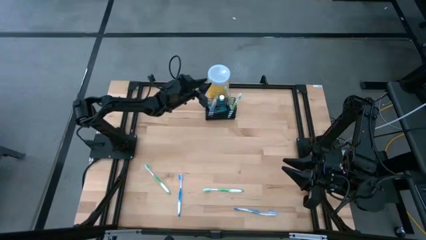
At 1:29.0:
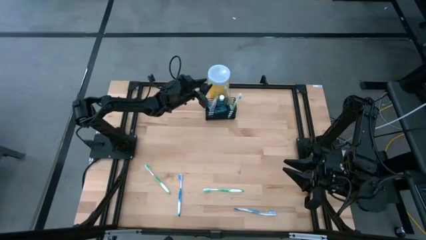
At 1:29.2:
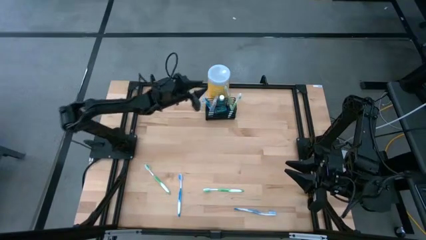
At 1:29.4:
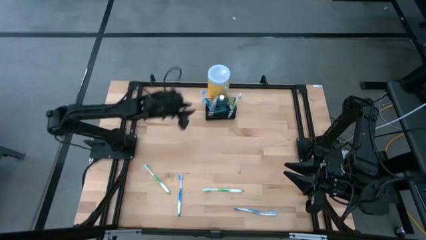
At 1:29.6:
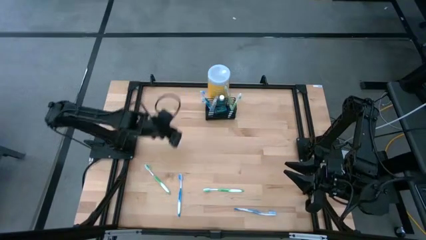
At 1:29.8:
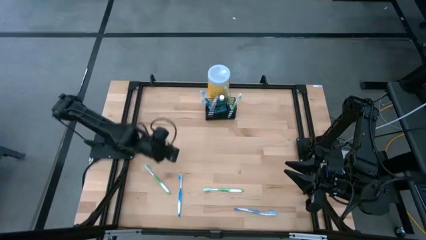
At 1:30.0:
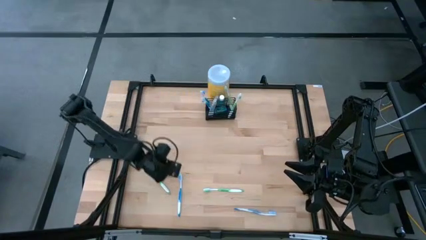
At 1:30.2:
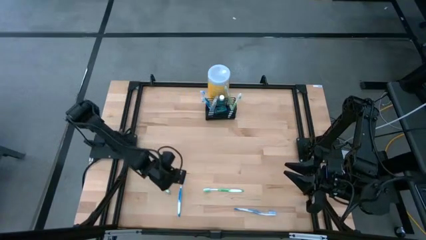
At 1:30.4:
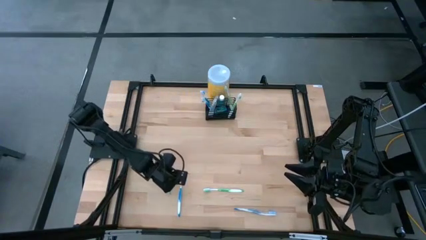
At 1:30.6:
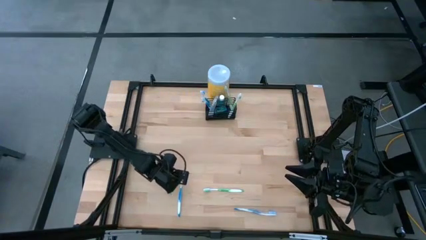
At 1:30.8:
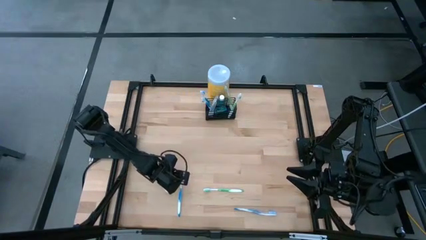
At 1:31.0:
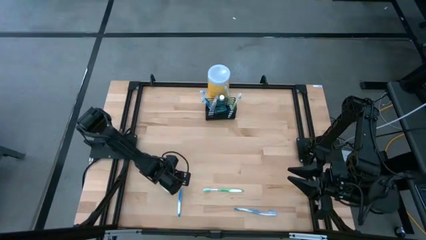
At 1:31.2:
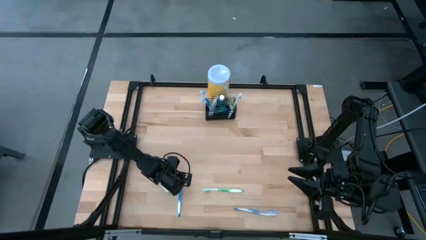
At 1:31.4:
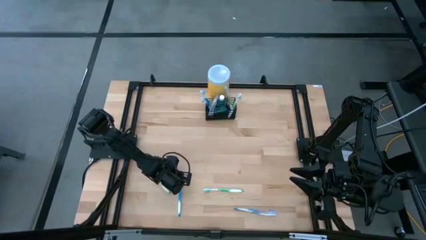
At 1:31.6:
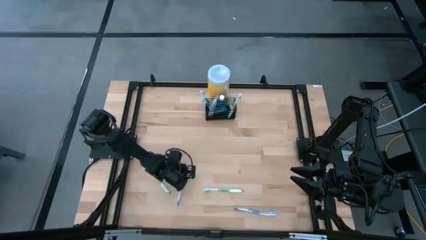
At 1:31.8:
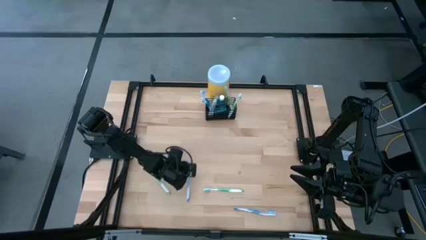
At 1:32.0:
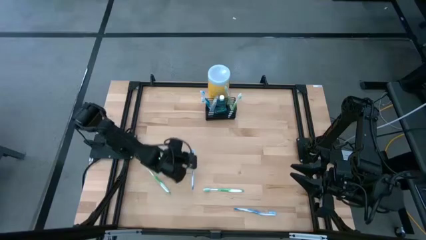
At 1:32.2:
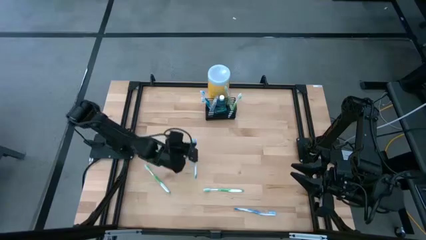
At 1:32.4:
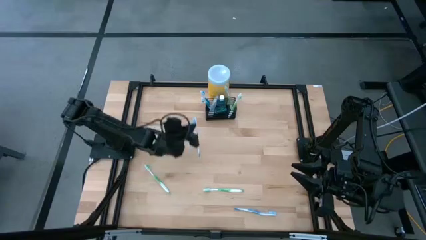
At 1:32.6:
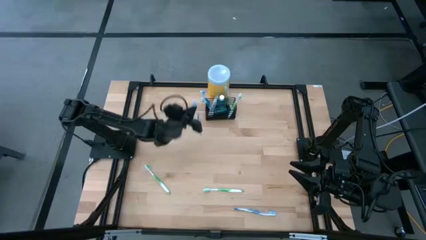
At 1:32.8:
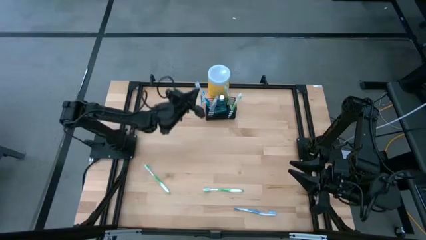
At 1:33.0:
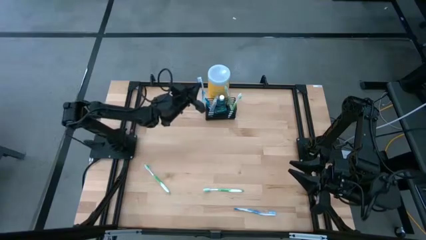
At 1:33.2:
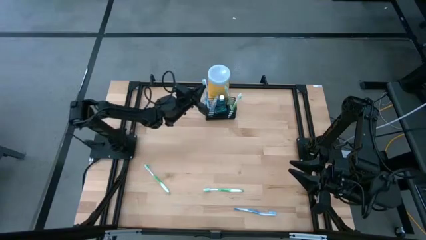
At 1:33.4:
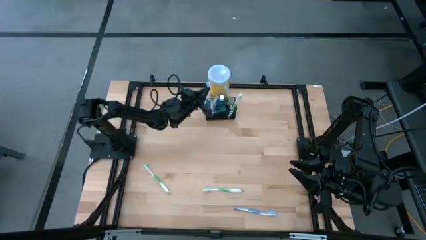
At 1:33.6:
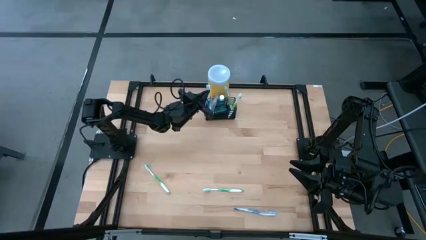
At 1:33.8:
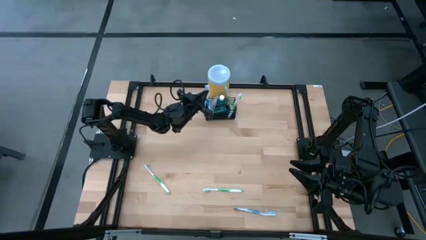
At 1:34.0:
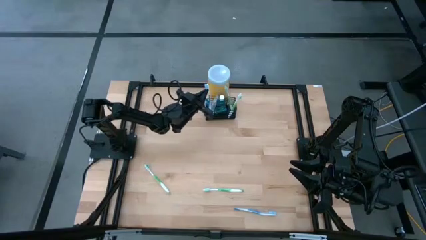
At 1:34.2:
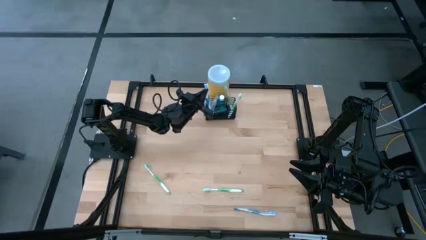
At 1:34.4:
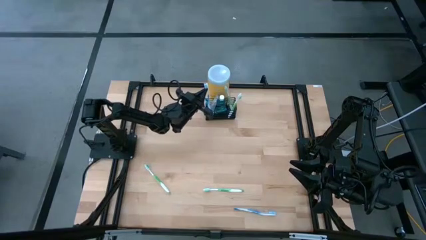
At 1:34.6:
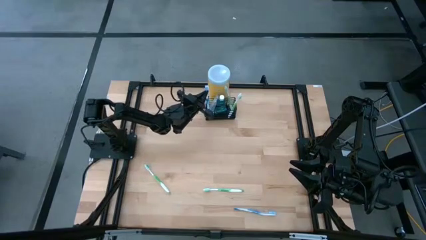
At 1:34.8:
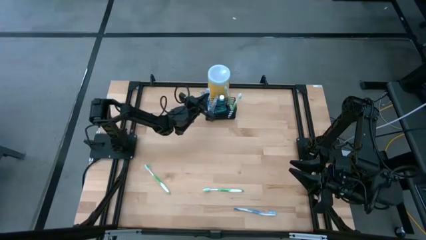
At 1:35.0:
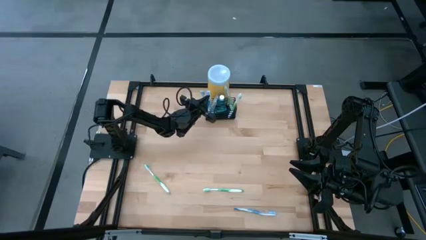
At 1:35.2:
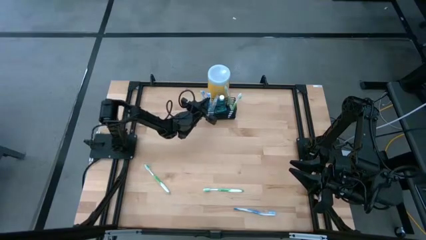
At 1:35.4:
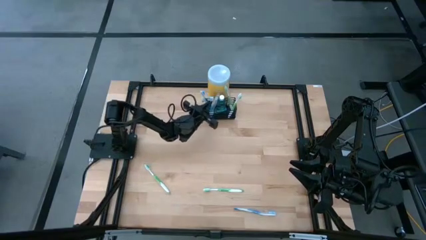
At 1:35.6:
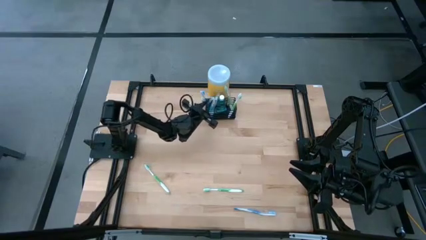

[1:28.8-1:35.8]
Task: Pick & Place toothbrushing station
Put the blue toothbrush in the wire organizer

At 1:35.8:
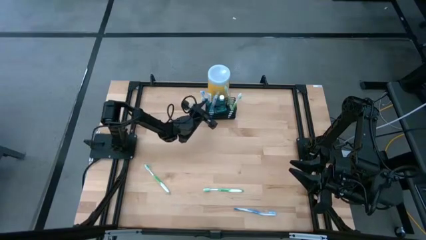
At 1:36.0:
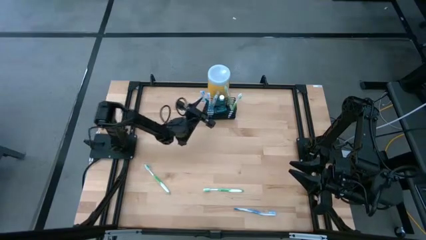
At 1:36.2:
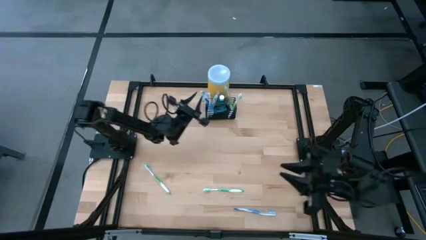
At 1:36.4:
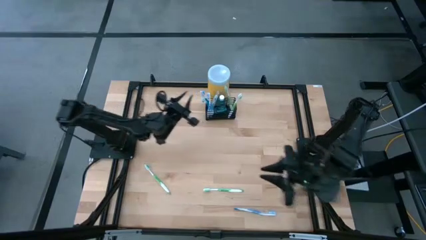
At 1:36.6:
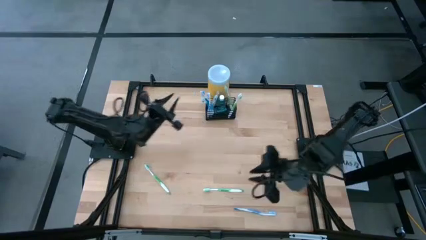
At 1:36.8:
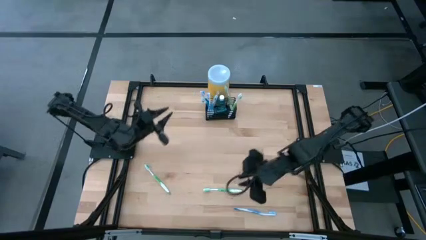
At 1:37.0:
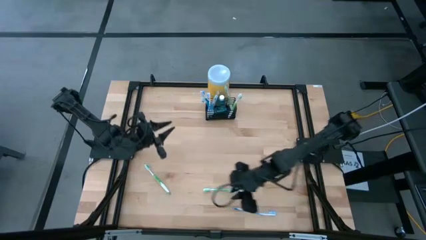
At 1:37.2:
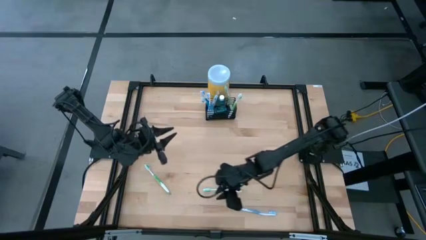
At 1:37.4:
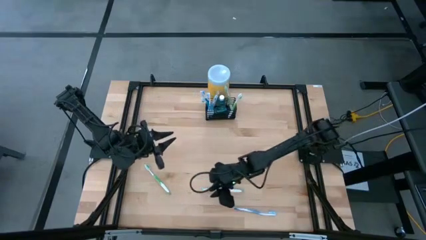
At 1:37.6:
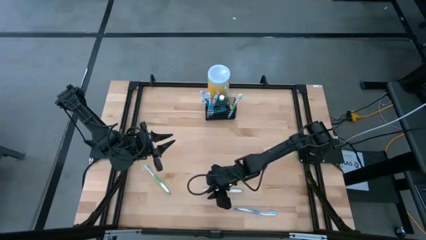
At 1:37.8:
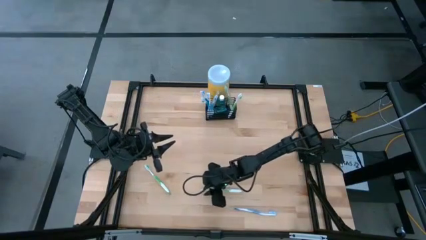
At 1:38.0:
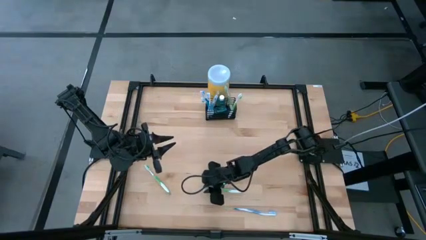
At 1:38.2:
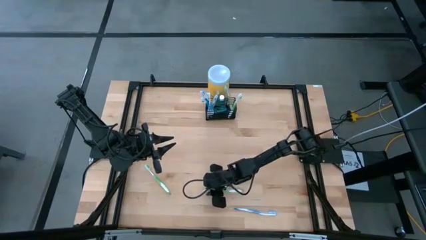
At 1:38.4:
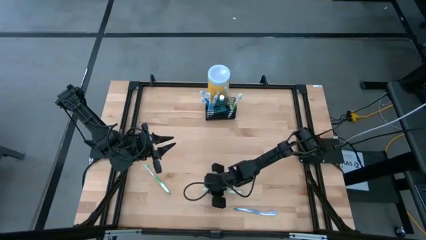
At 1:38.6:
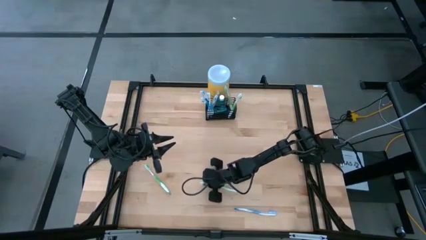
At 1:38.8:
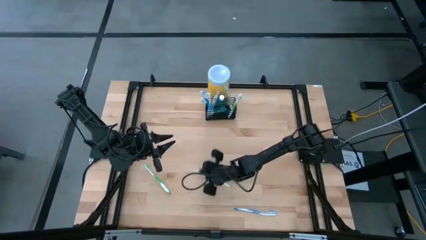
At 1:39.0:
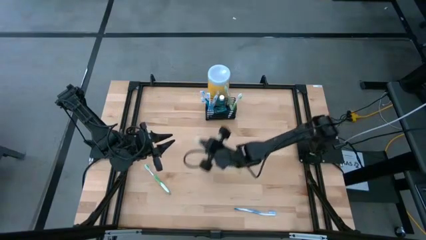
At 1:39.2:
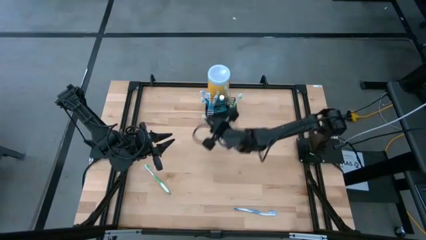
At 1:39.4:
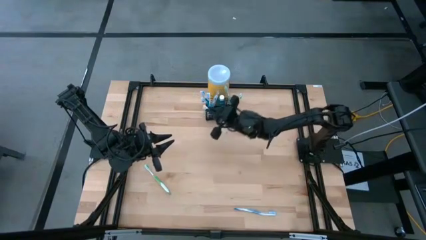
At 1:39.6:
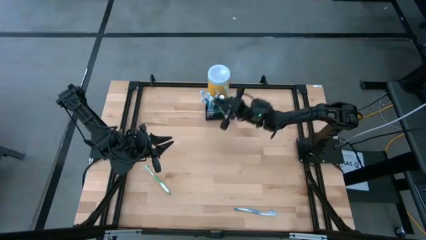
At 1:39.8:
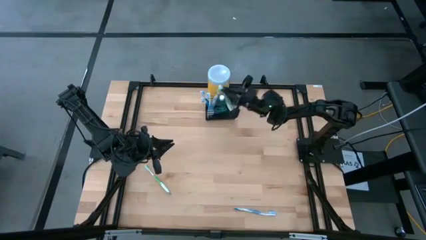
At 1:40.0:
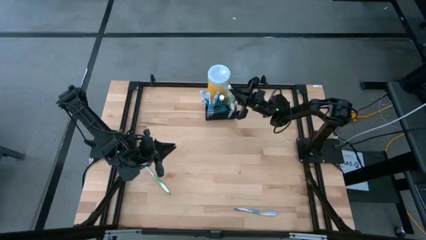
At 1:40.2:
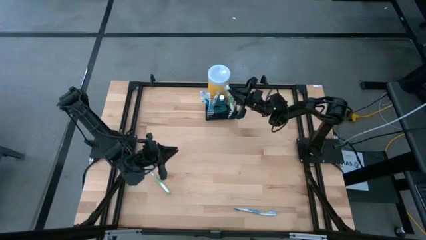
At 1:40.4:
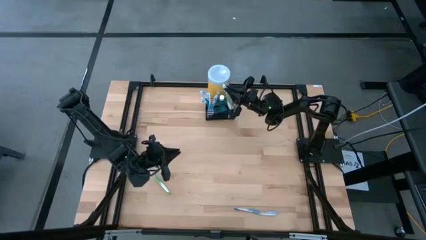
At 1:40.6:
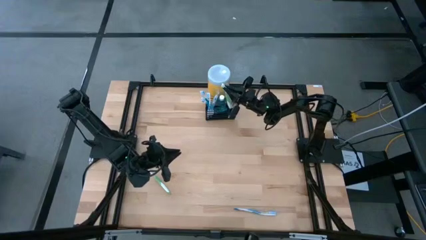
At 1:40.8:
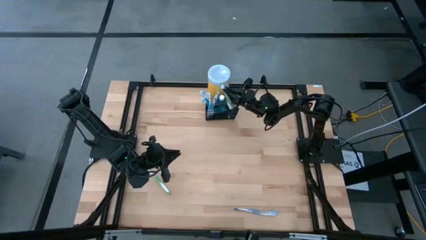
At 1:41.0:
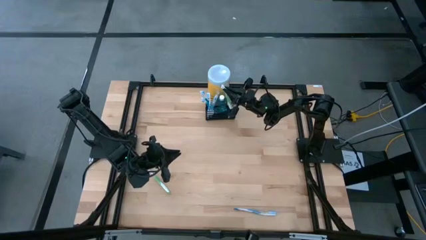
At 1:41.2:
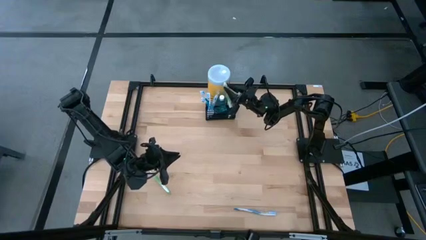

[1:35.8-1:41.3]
Put the green toothbrush in the wire organizer

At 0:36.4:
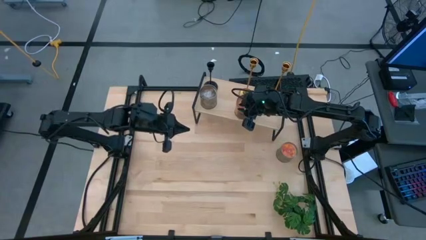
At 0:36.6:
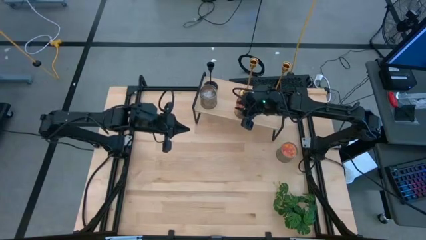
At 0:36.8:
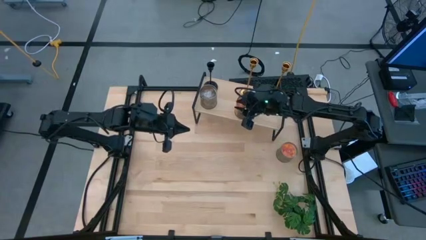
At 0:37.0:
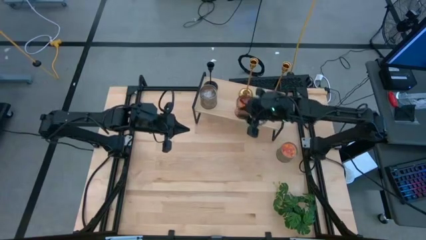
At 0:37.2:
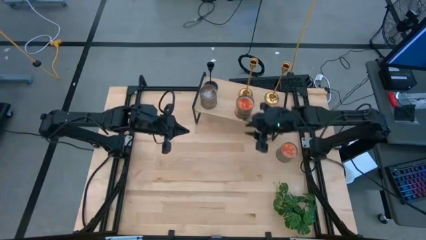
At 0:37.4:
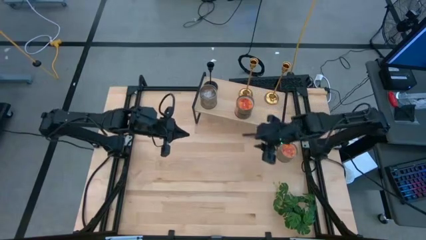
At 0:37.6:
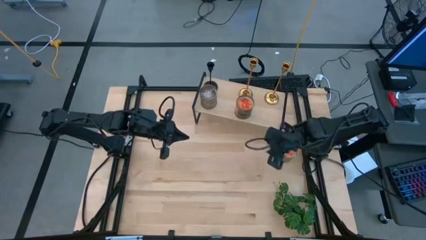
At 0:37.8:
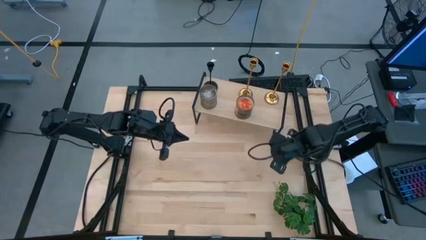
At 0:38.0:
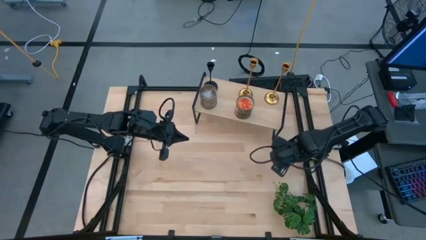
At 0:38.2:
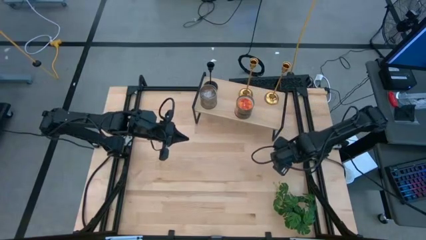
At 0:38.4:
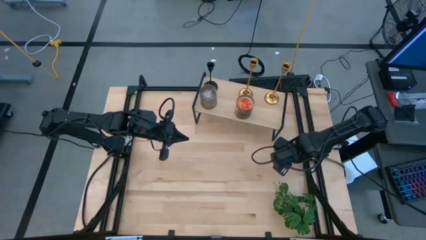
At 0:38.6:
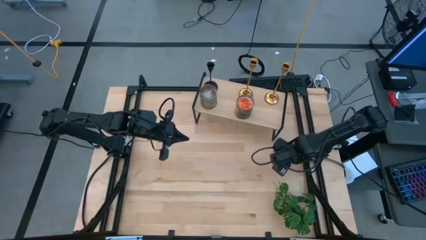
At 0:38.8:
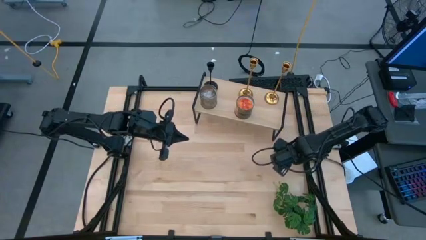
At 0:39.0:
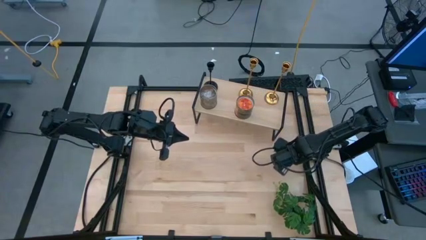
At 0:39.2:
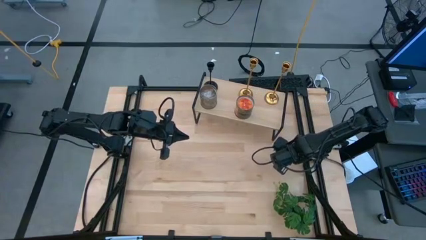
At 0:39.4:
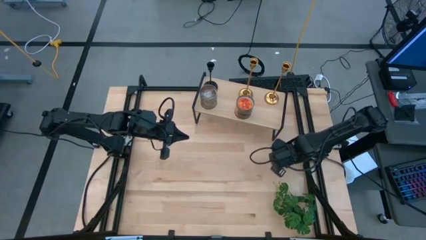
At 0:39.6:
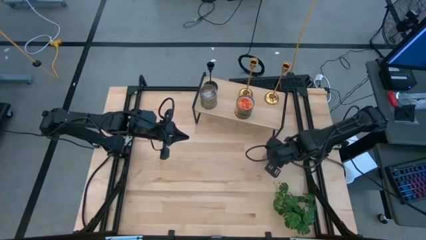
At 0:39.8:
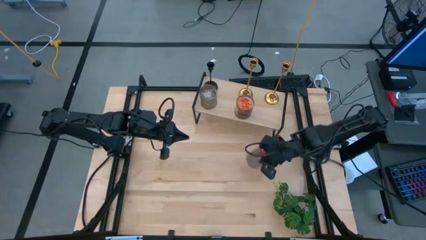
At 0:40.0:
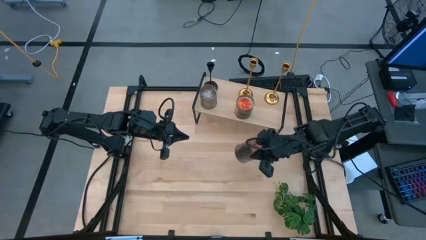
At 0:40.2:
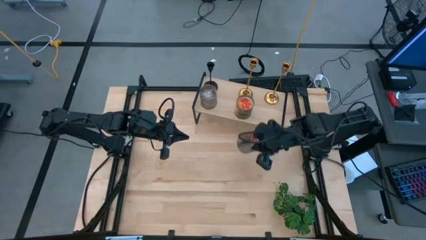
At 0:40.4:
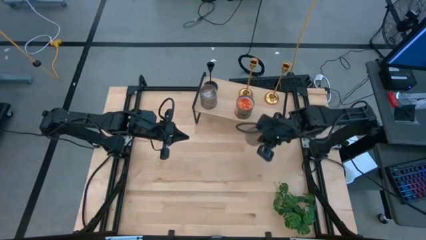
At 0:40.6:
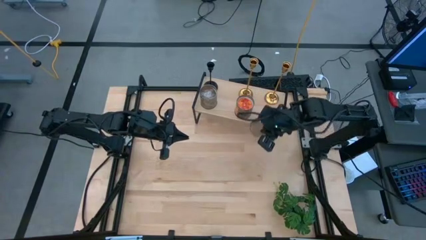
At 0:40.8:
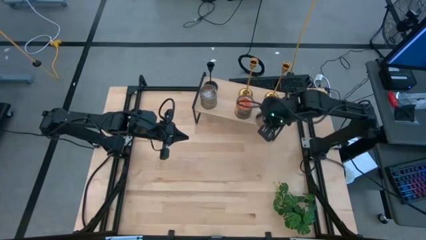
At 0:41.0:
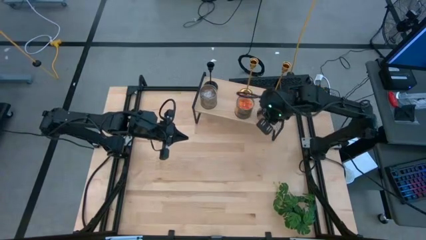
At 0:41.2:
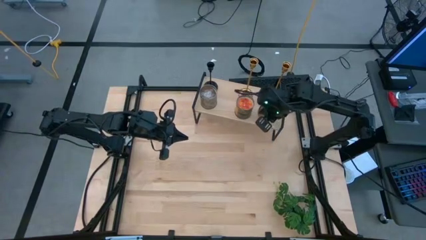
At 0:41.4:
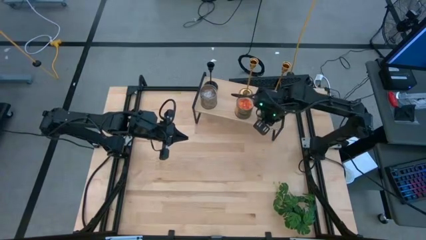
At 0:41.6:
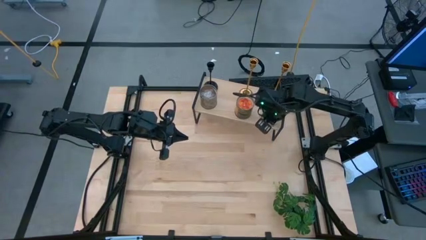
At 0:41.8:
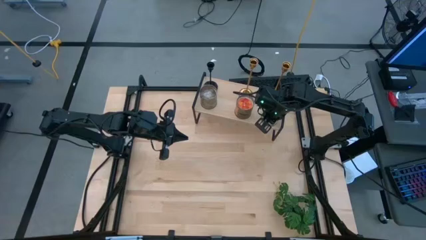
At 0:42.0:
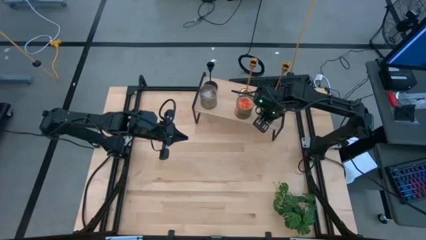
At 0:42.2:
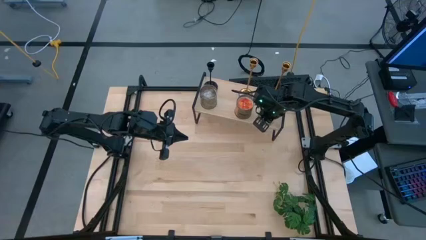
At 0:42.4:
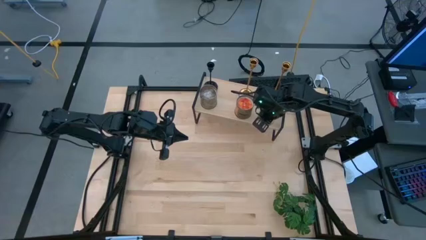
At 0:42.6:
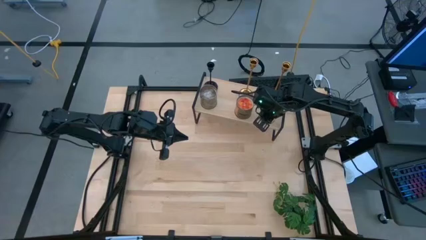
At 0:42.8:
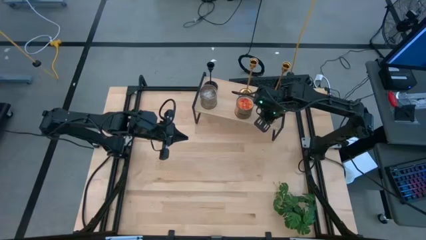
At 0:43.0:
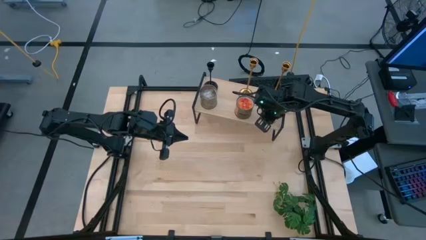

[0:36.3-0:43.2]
Task: Pick & Place candle stick holders
Put the orange scented candle on the shelf
